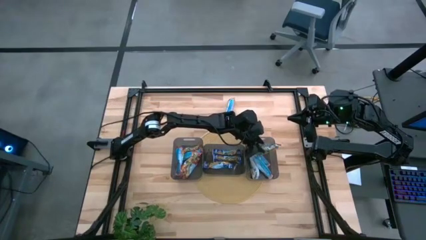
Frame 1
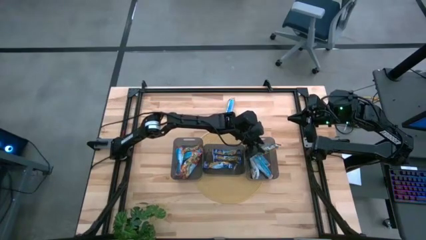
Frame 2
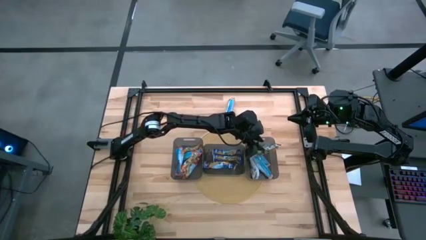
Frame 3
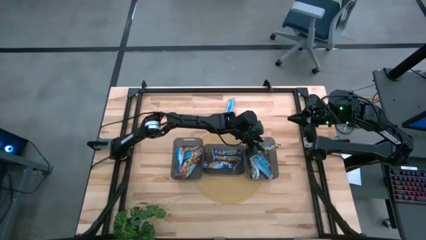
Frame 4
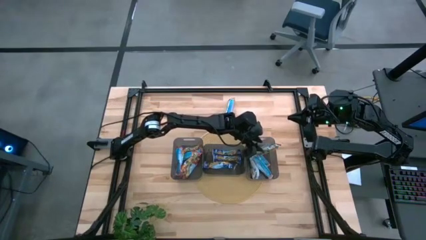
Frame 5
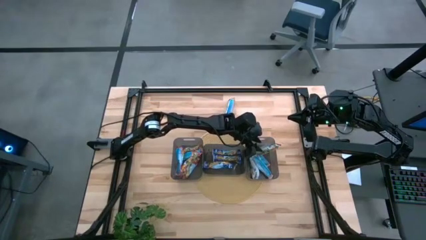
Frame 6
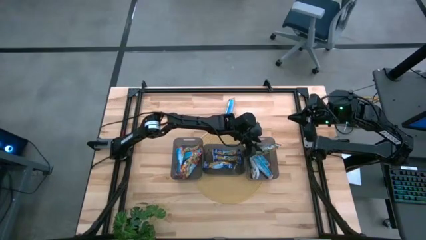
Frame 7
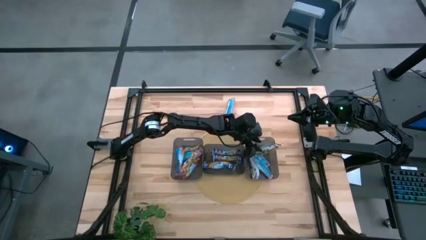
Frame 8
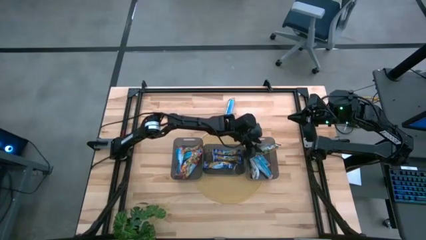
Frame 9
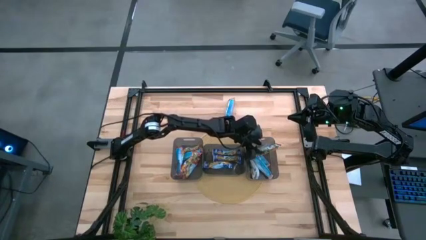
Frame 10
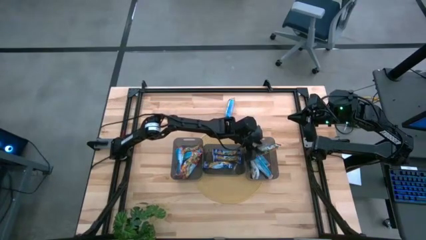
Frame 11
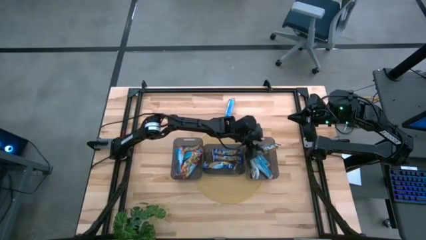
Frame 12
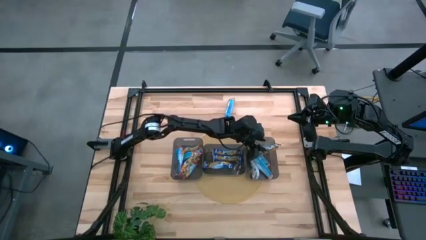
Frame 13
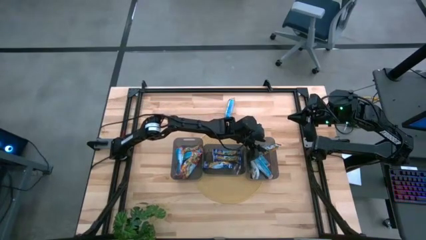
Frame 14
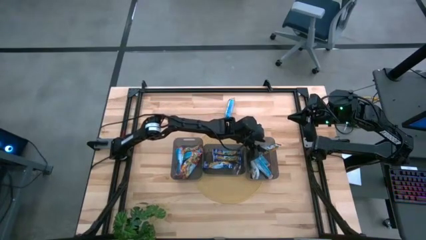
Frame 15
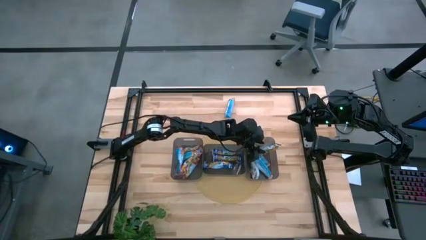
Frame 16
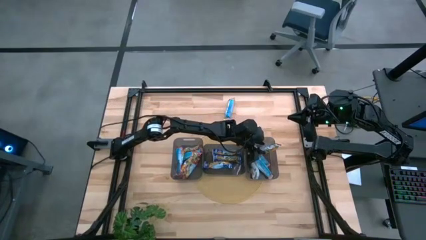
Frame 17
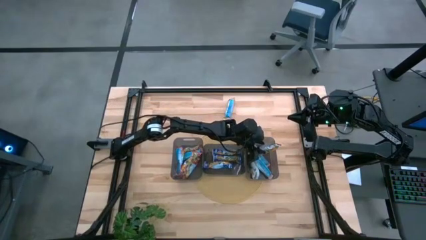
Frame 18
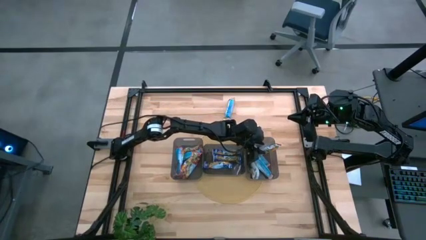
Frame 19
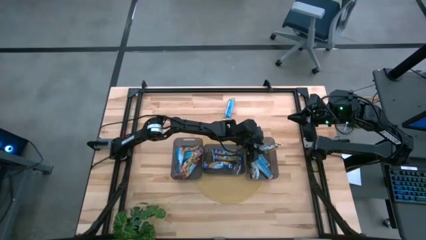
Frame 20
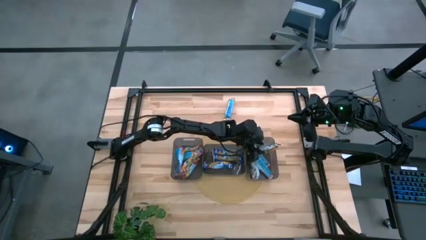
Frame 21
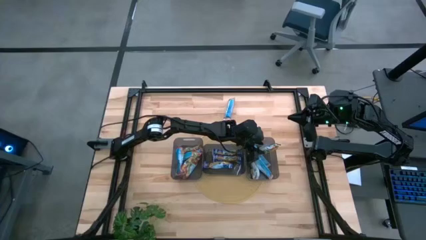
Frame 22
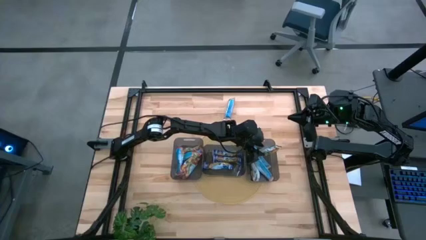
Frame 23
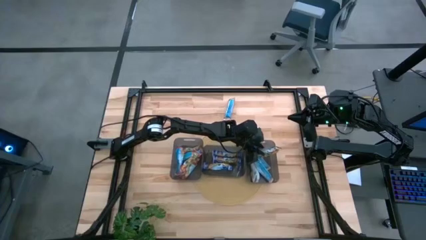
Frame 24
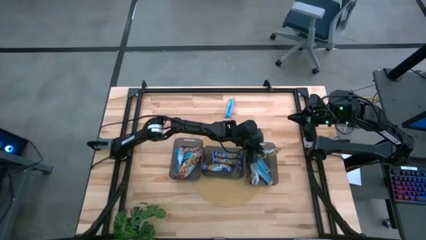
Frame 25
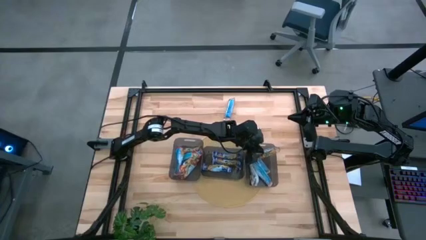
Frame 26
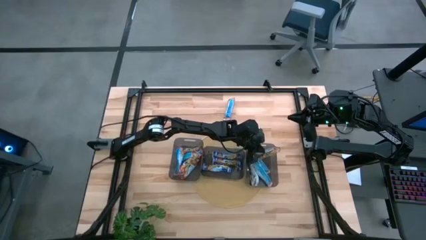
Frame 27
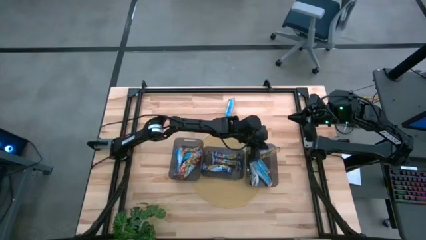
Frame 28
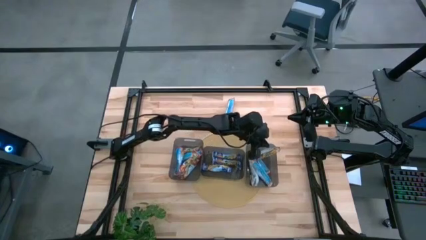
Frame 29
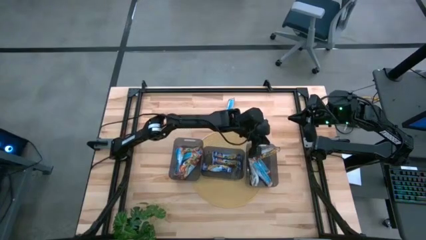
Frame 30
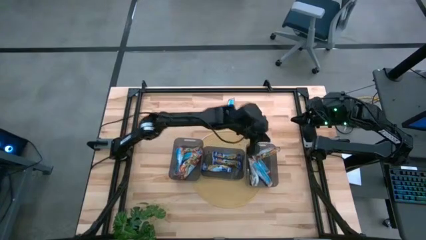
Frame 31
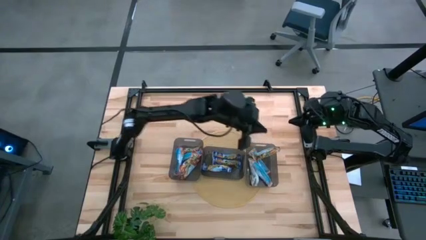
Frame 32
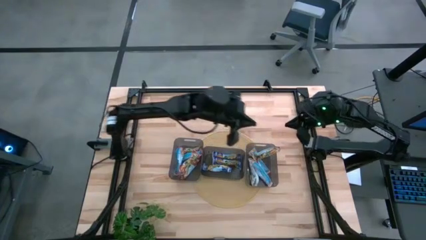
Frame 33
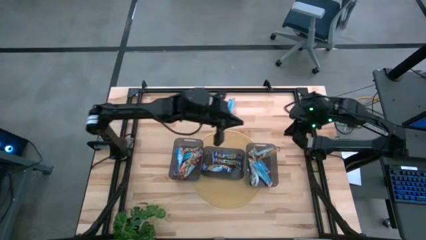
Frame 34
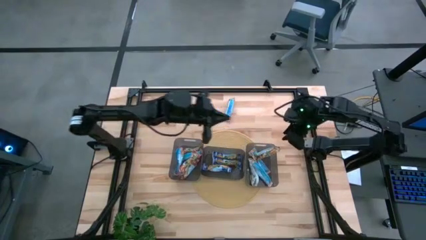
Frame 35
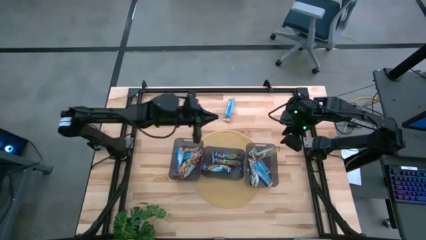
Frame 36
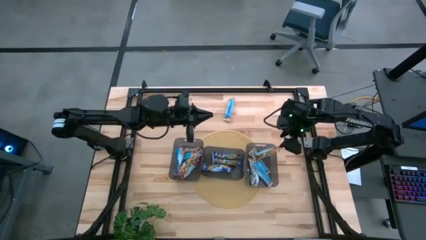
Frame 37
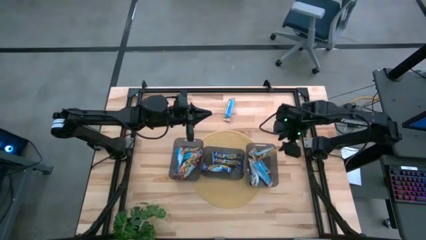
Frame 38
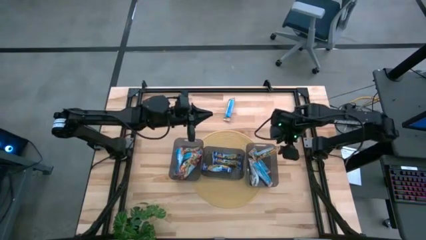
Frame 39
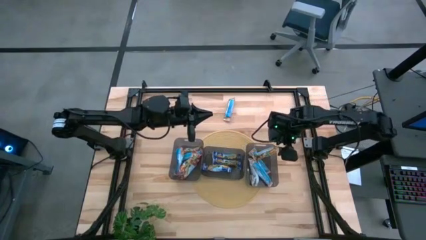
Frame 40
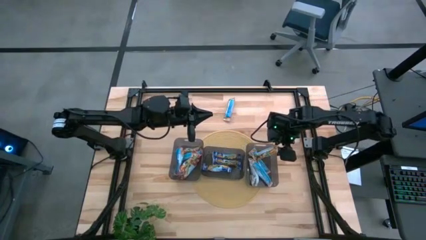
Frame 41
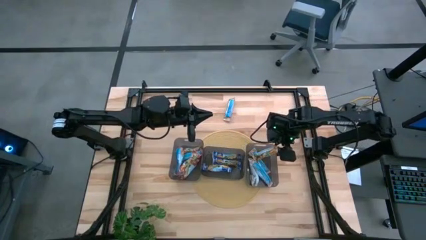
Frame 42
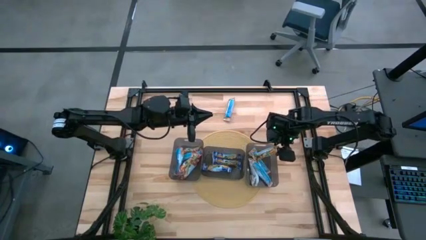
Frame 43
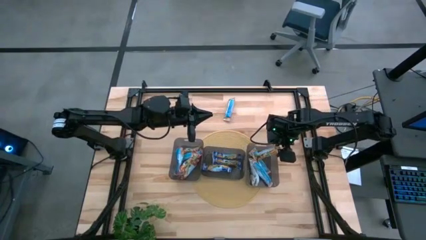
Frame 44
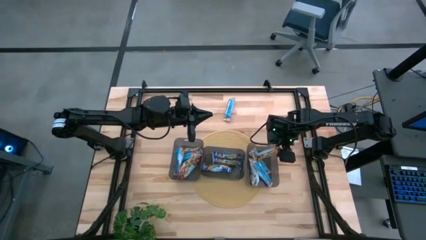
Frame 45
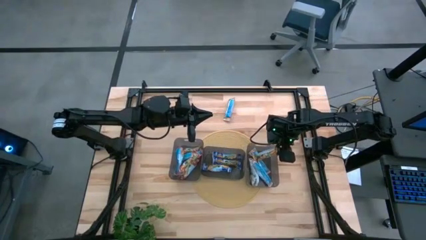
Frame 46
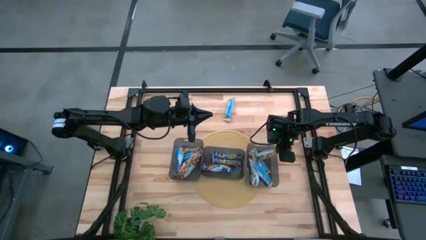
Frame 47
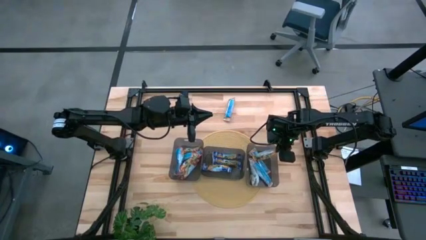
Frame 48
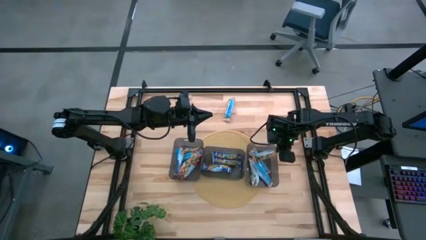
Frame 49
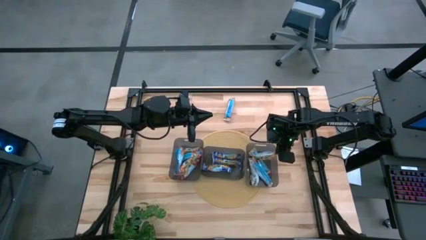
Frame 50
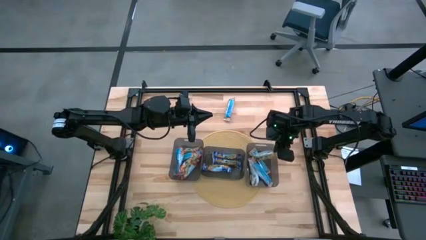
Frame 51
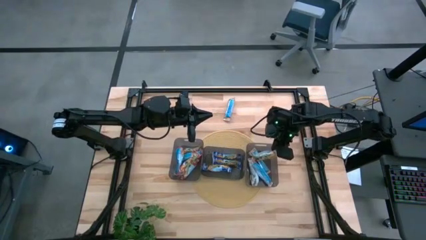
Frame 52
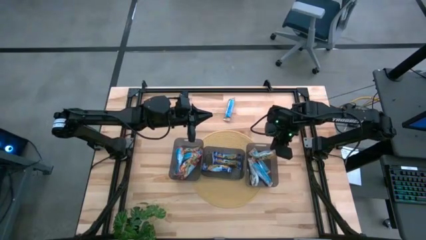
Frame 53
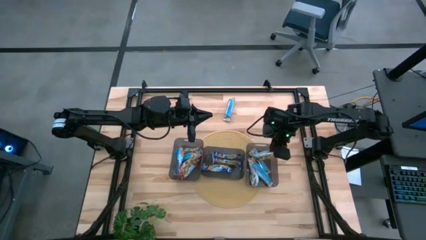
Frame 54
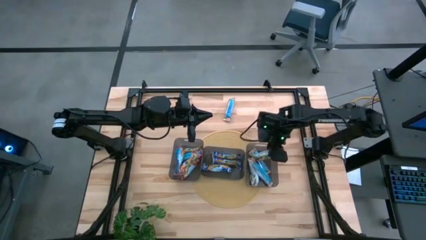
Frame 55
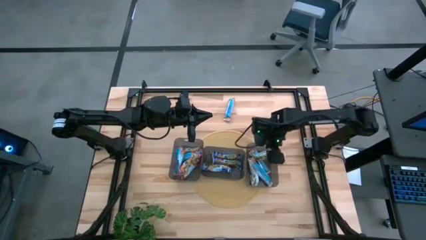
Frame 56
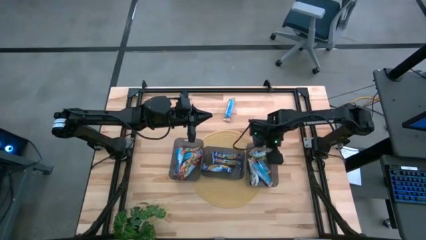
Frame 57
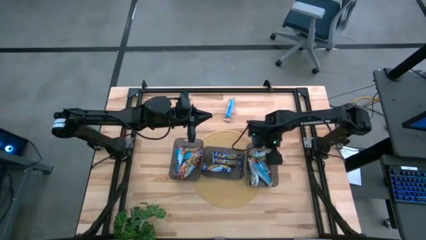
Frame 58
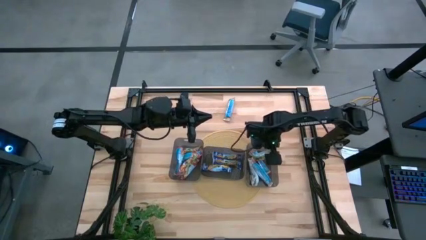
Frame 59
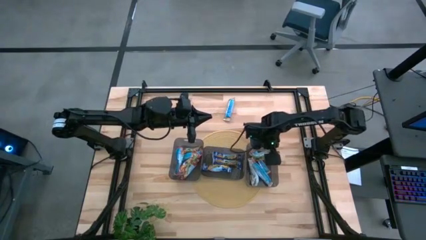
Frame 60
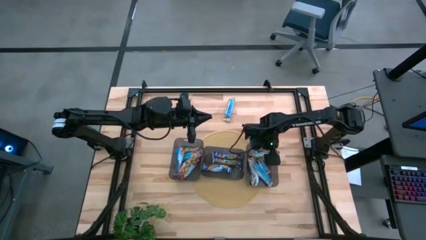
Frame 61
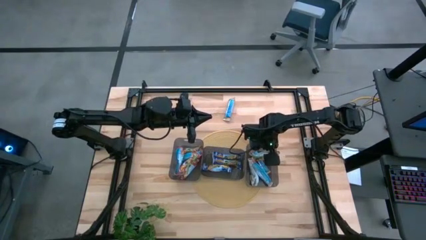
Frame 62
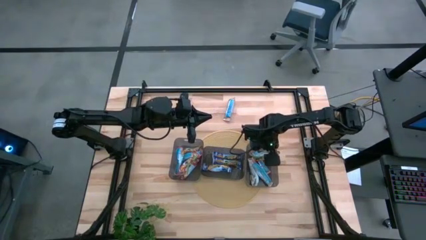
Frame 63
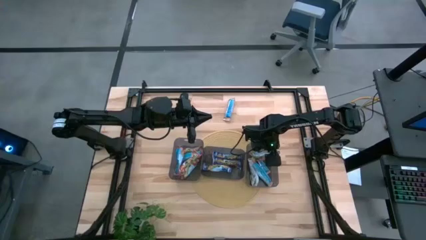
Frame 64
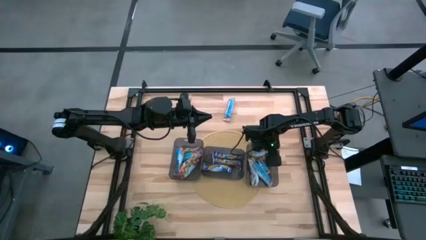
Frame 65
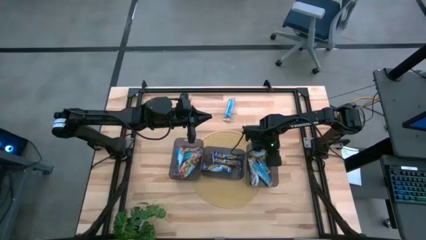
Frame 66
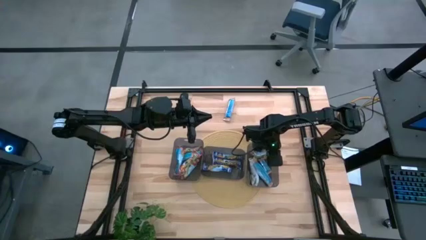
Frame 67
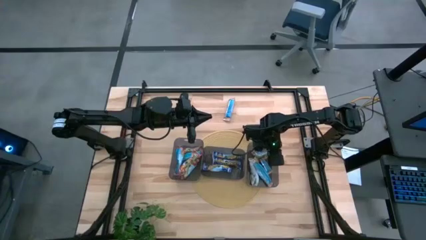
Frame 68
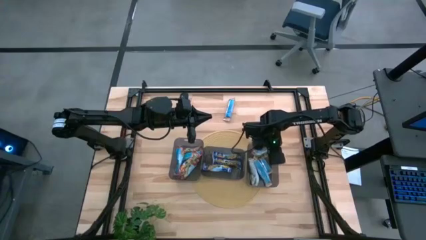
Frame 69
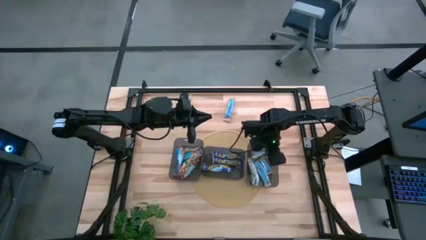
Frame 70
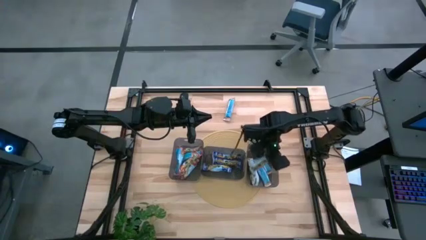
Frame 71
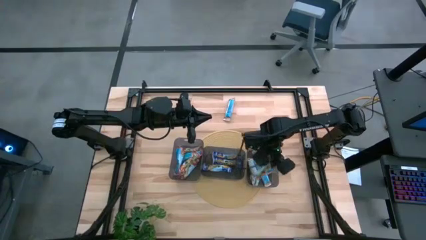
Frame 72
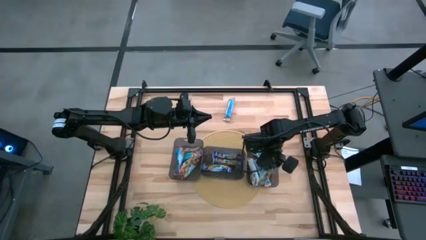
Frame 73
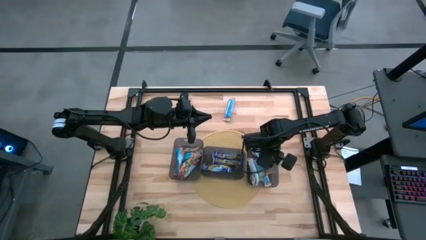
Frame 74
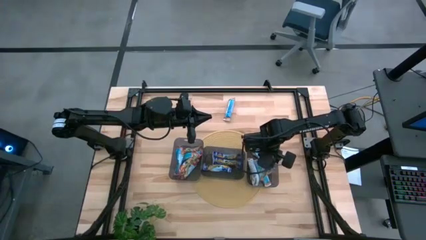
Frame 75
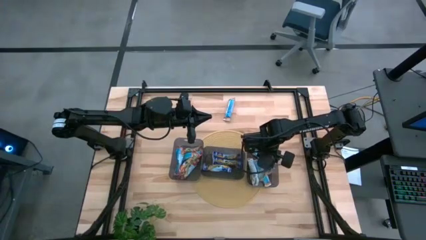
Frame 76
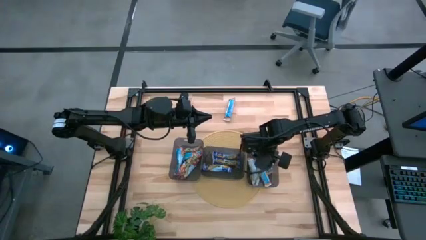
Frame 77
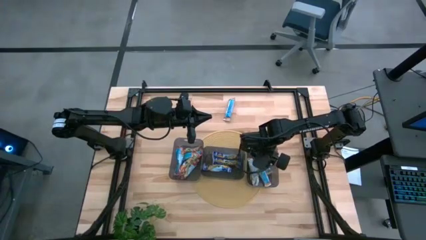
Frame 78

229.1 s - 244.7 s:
Task: Pick and place Granola Bars by type
Put the orange granola bar into the right black bin
